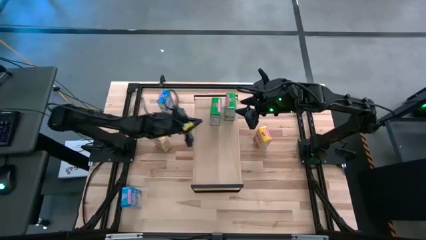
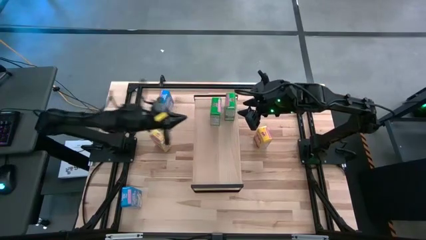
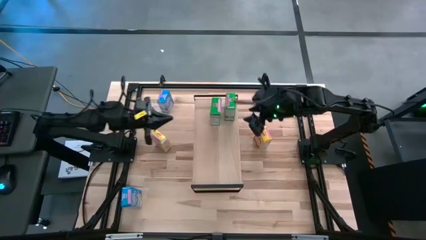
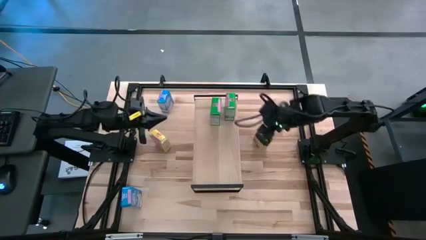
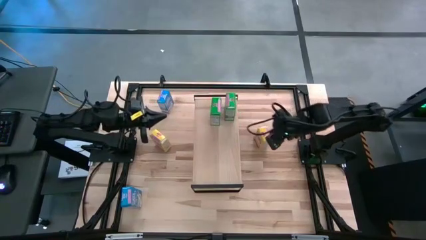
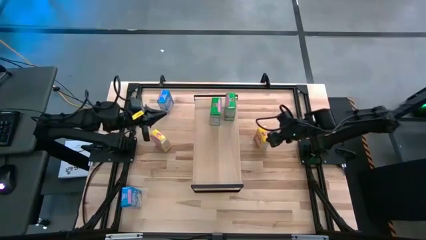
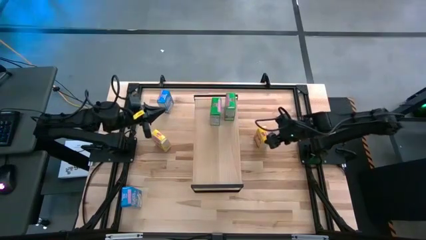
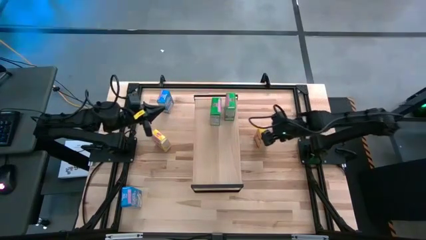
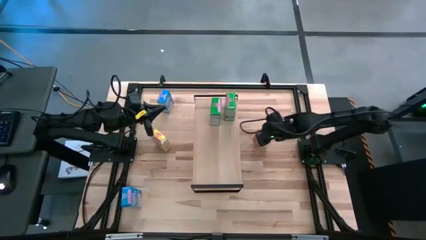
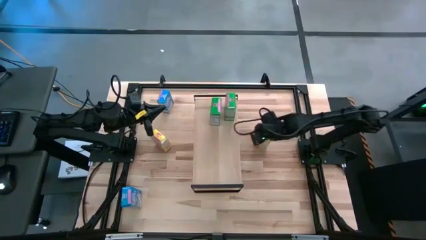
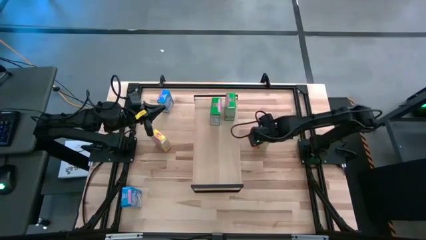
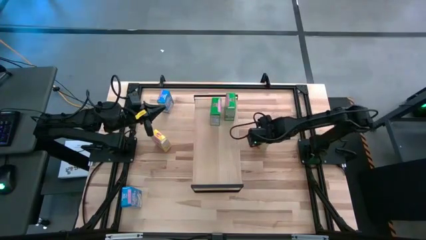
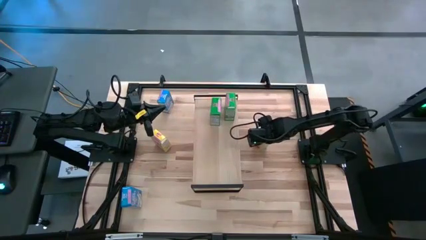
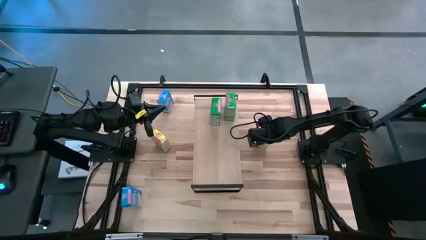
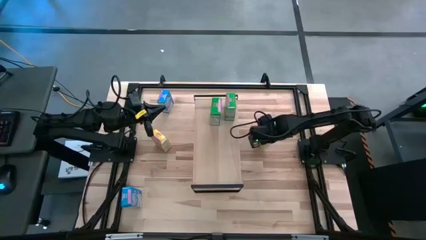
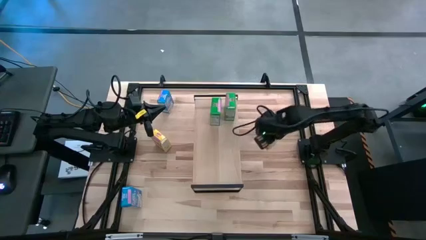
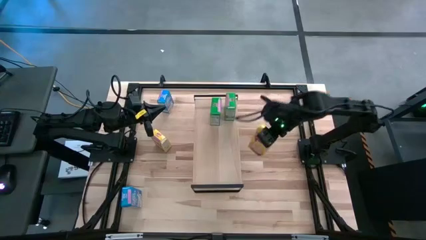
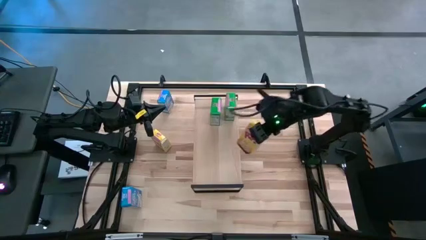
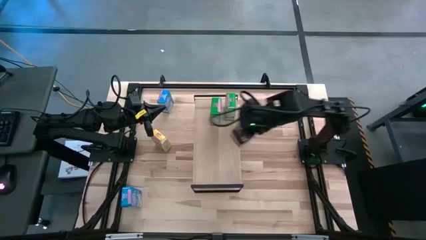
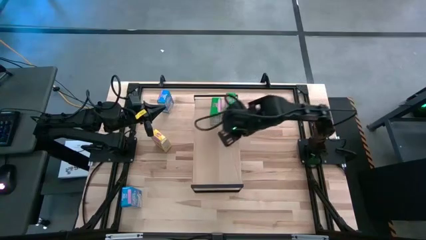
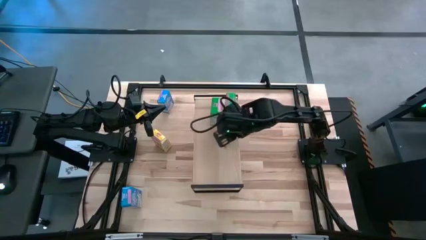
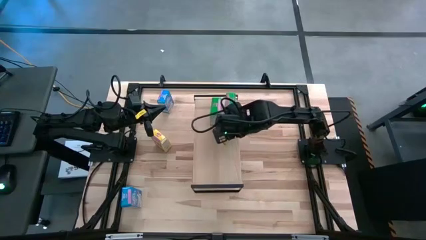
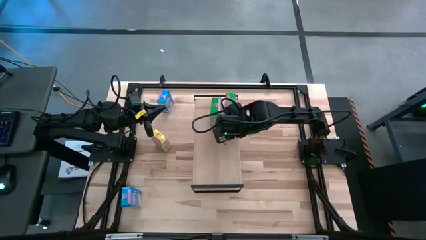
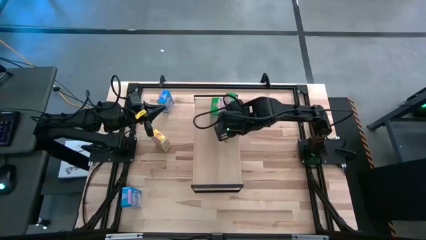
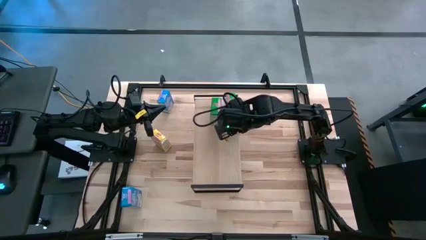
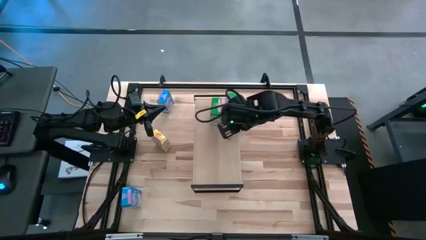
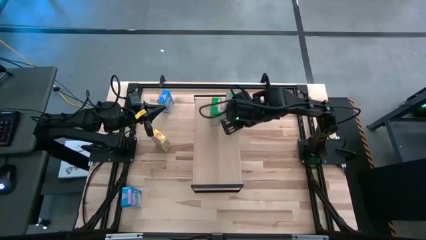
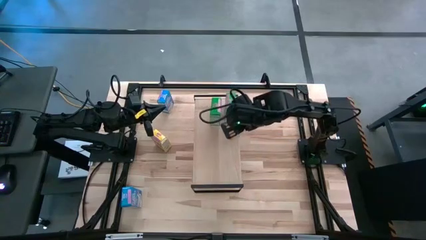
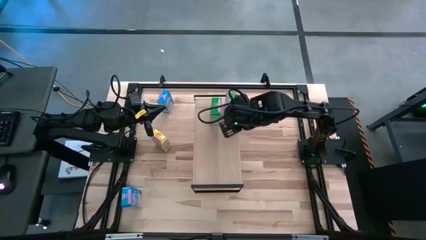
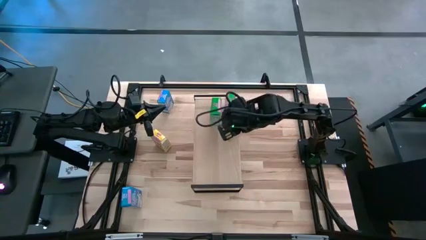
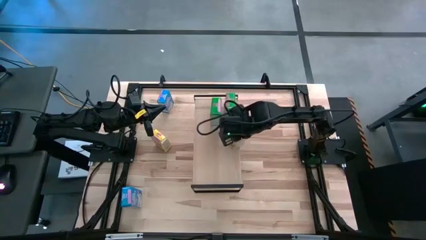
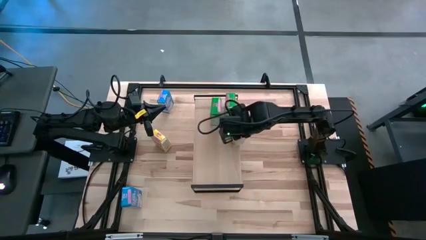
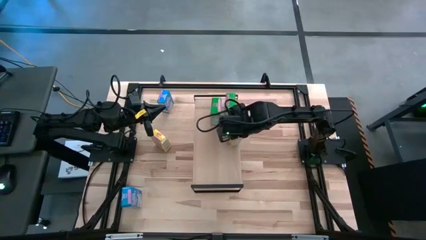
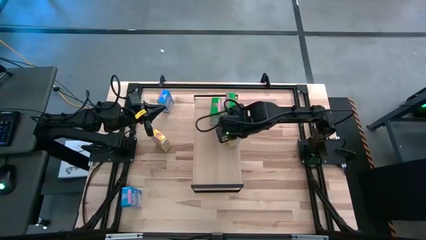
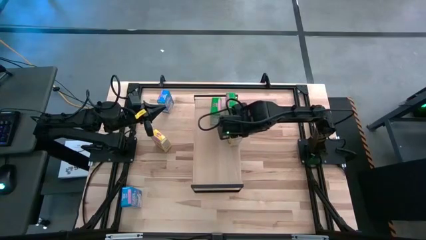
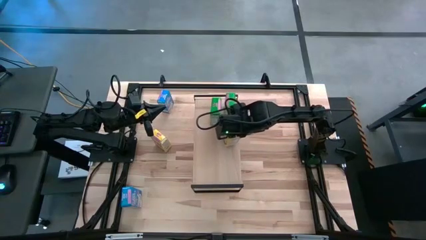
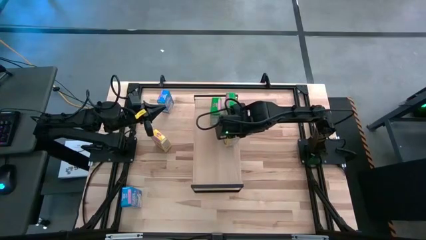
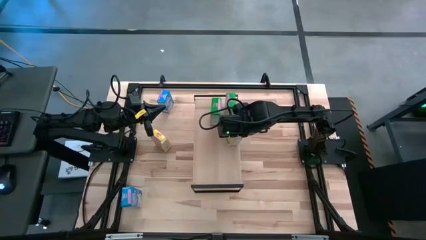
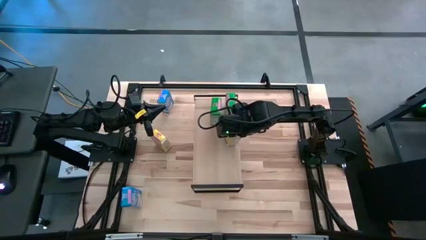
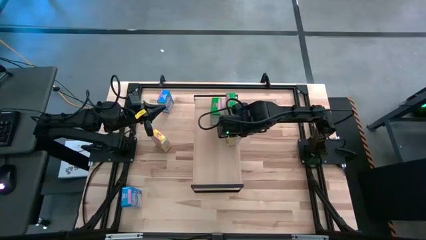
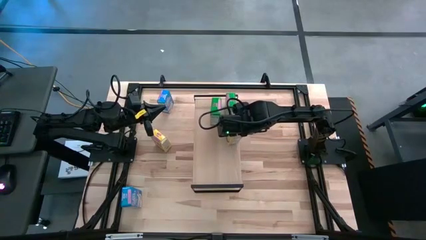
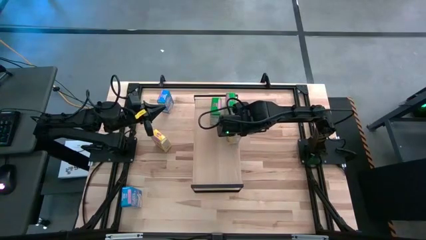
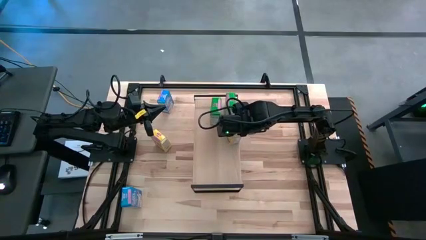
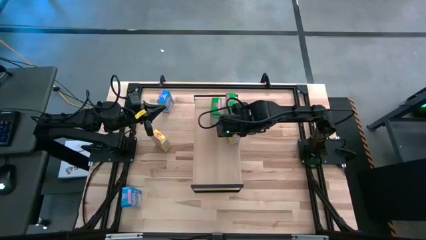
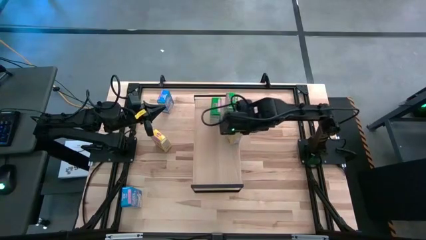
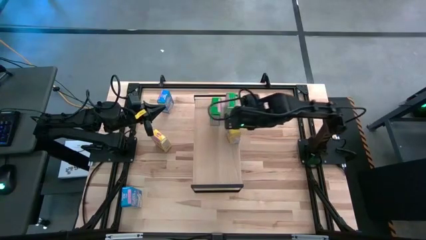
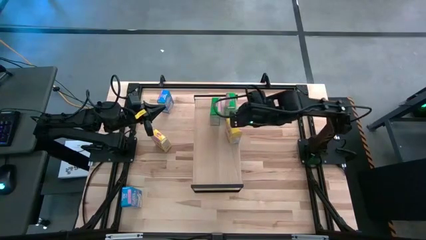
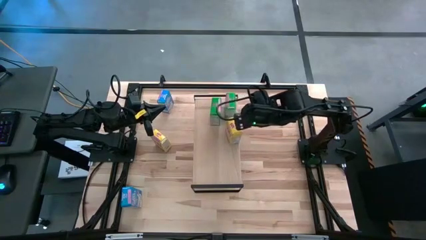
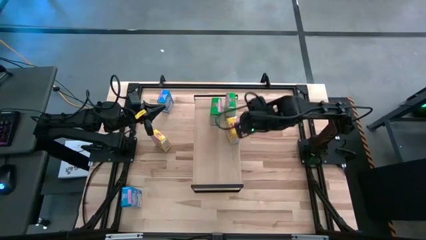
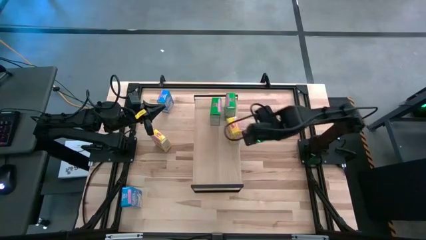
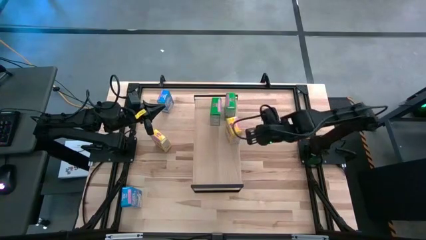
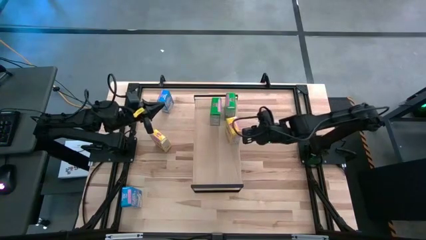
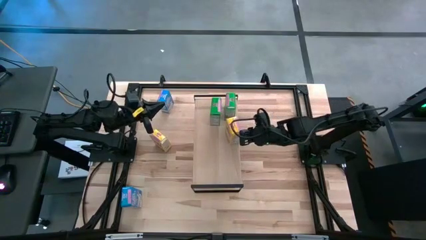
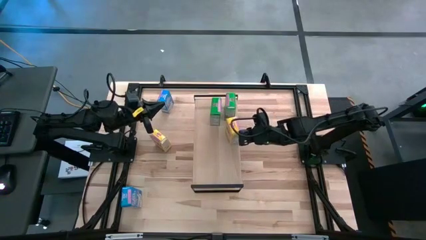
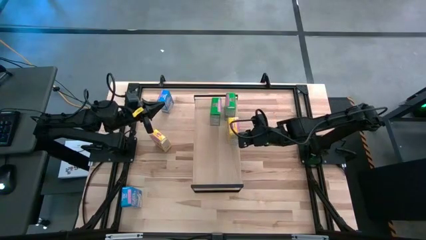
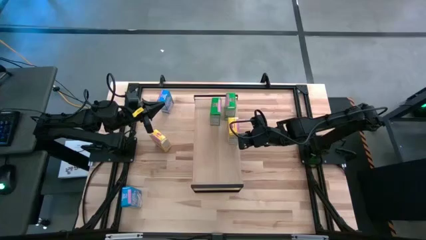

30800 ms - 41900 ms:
Task: Stack cereal on shelf
Put the right yellow cereal box on the shelf

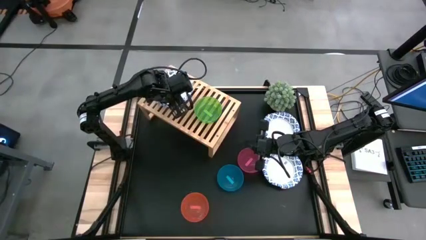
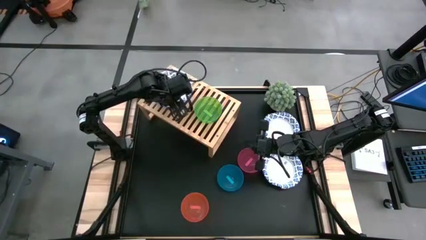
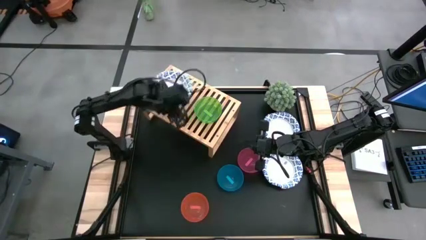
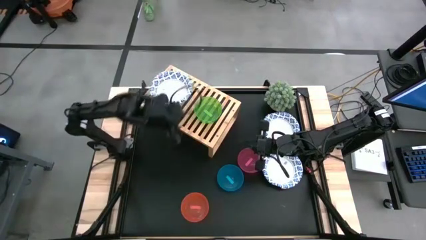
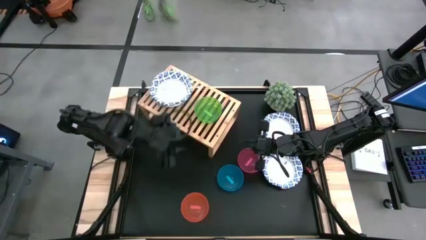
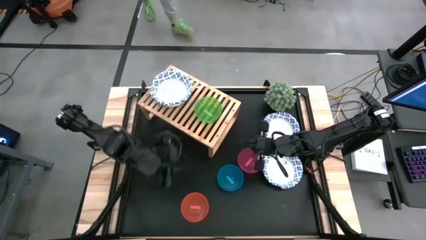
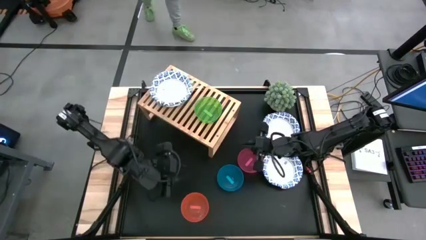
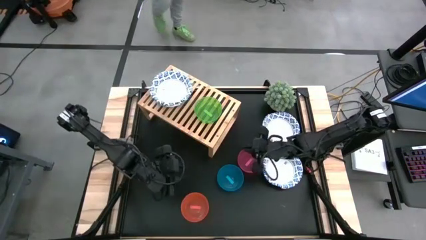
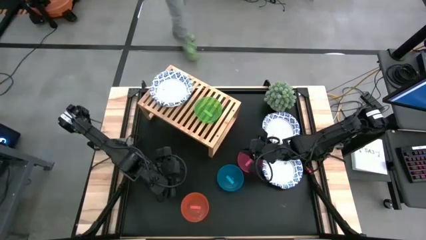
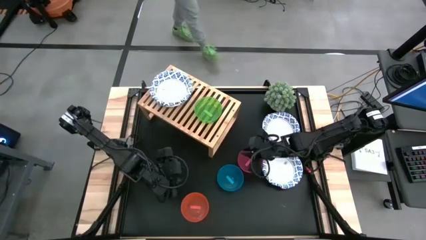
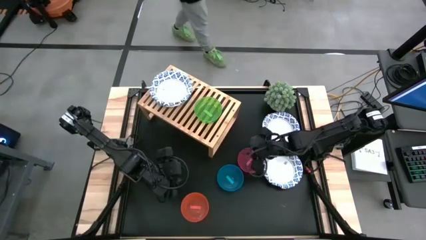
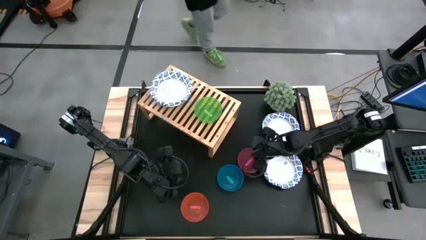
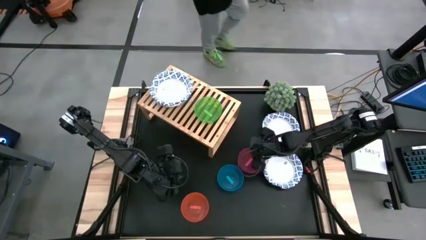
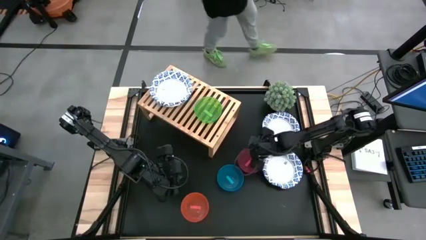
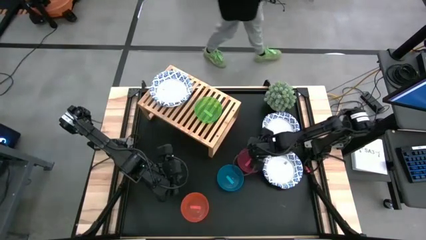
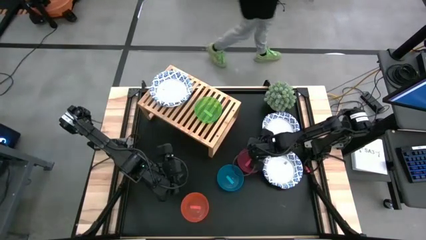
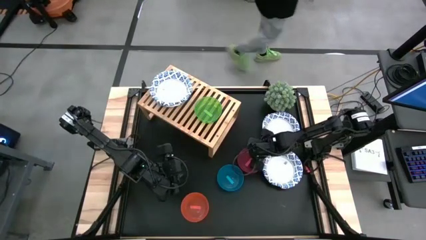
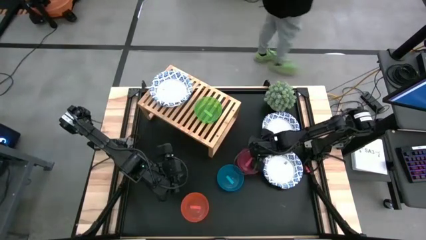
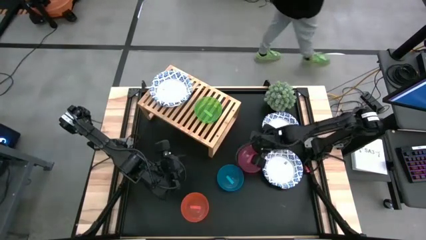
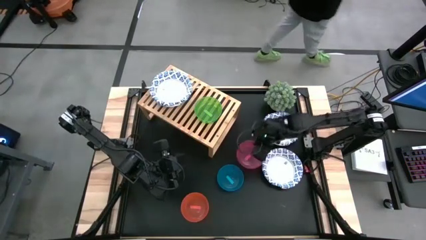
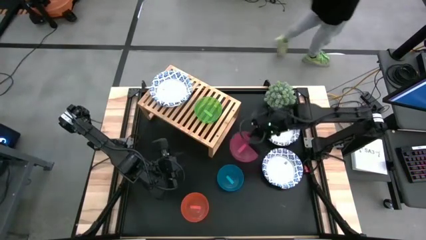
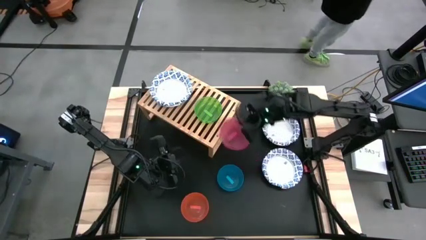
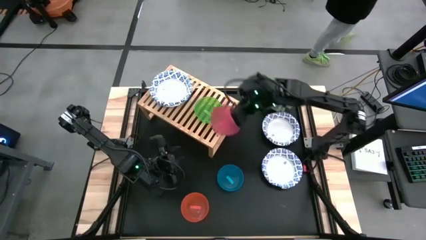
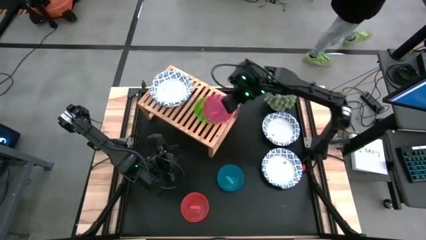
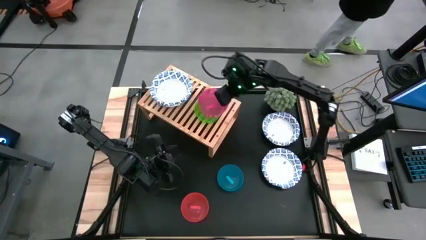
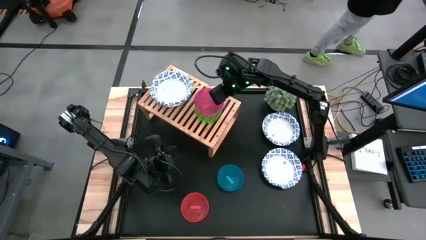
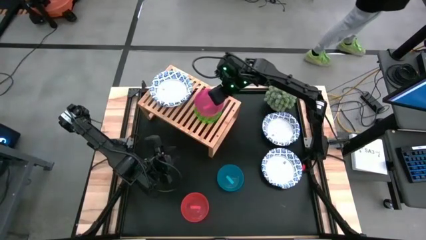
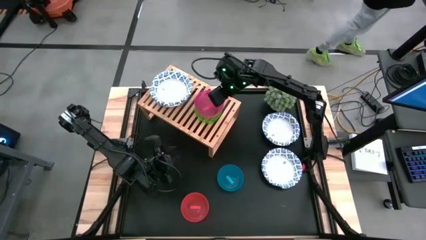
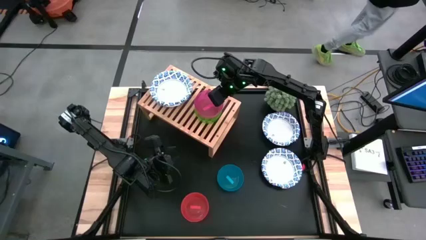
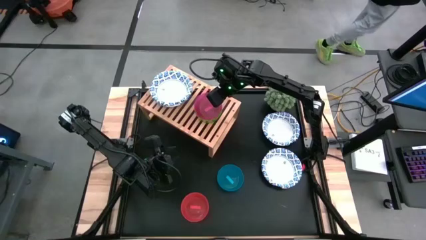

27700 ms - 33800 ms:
Task: Place and stack bowls onto a shelf
Stack the pink bowl into the green bowl
